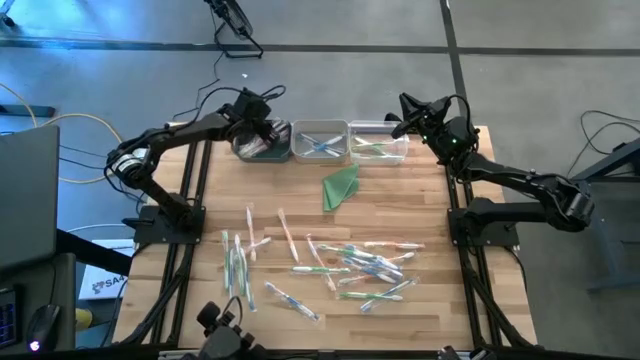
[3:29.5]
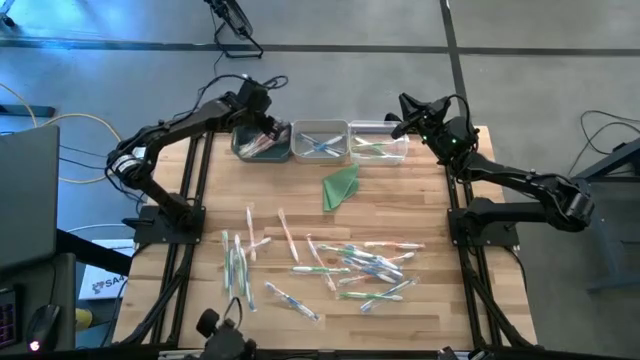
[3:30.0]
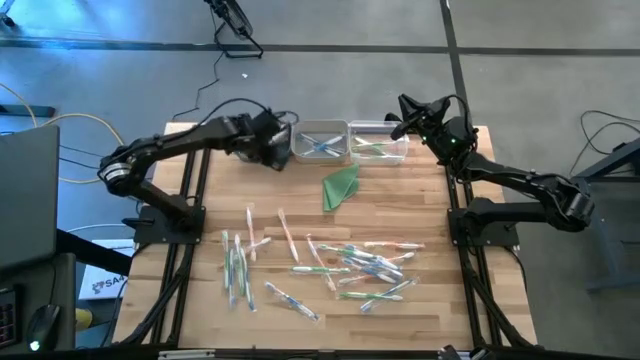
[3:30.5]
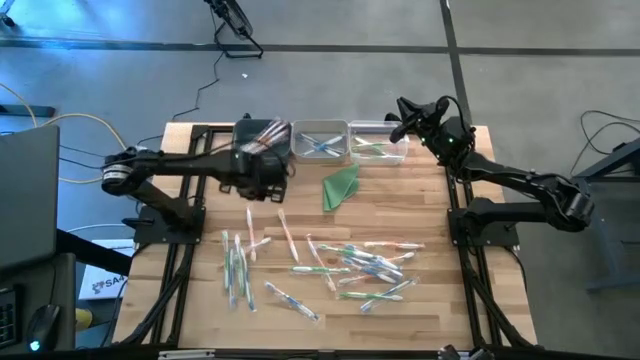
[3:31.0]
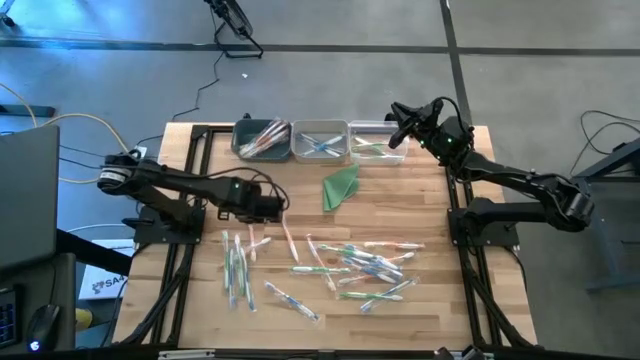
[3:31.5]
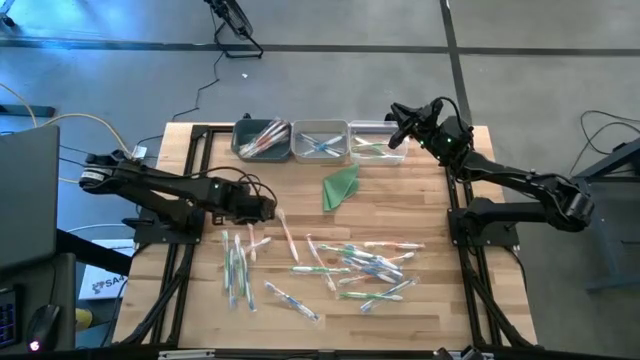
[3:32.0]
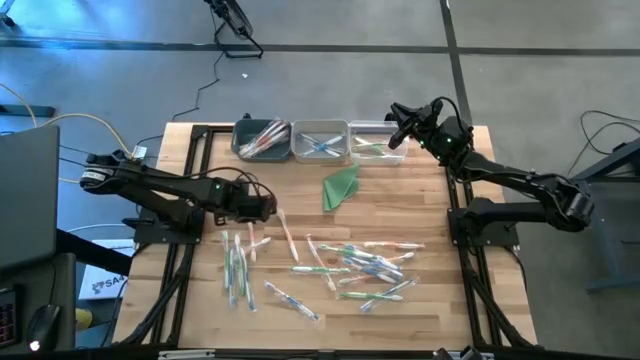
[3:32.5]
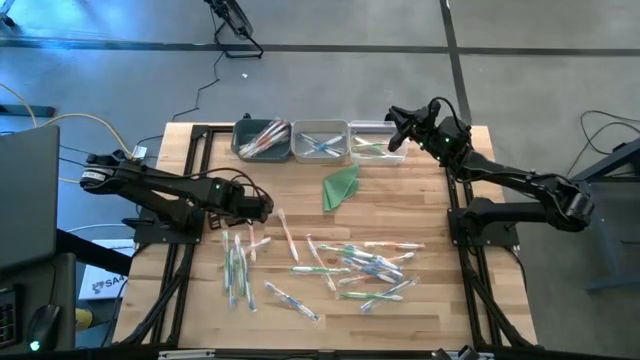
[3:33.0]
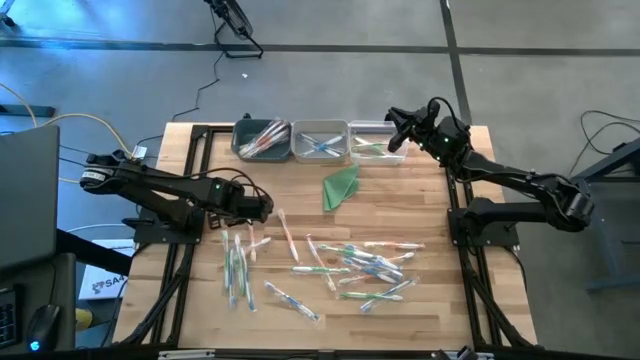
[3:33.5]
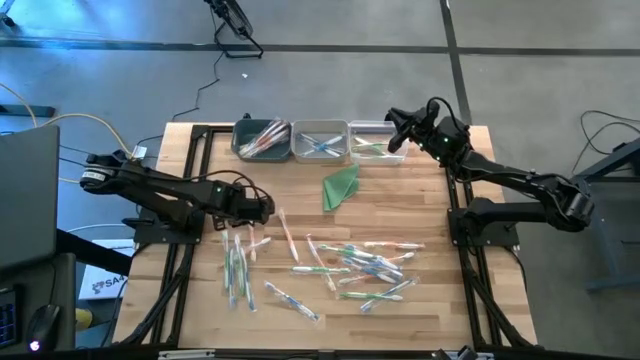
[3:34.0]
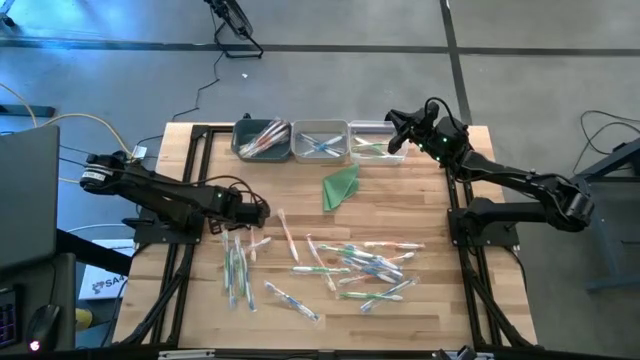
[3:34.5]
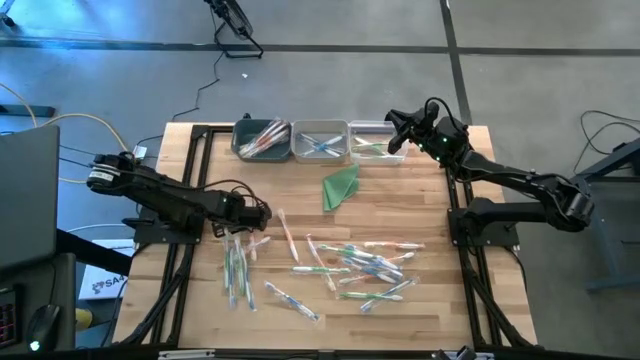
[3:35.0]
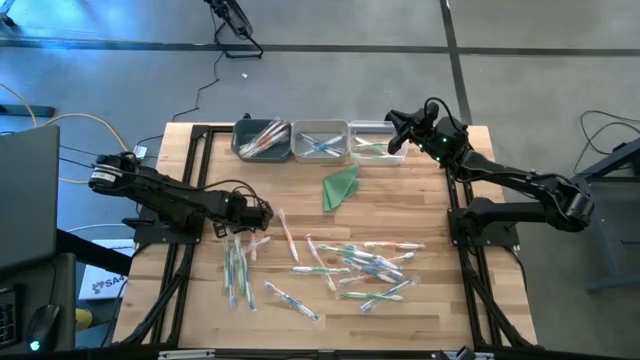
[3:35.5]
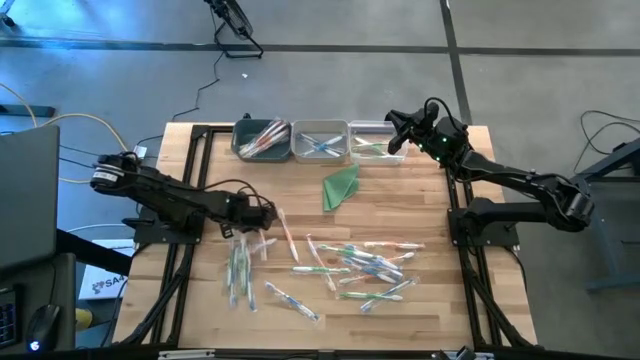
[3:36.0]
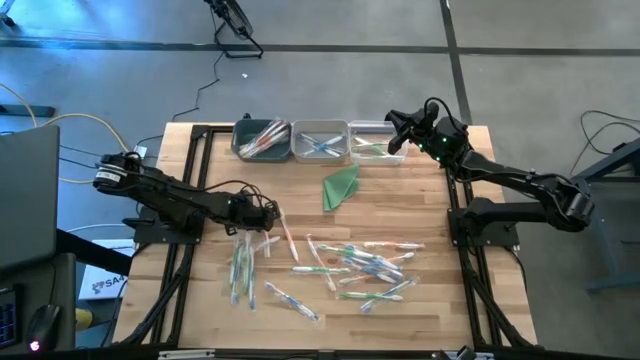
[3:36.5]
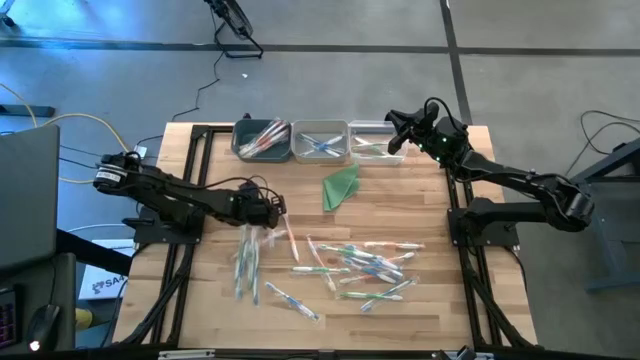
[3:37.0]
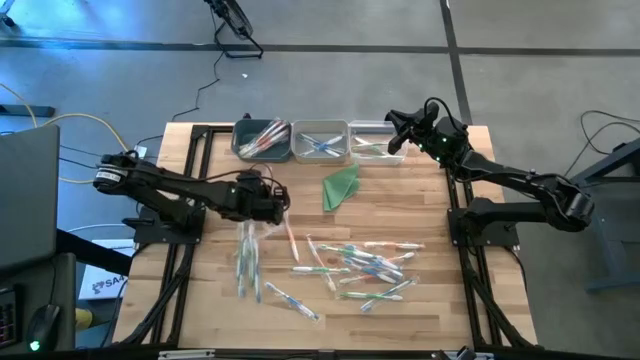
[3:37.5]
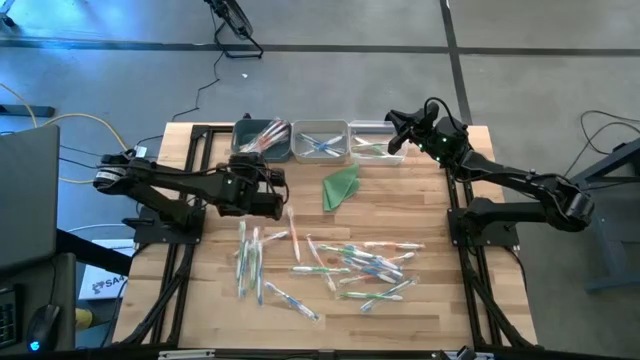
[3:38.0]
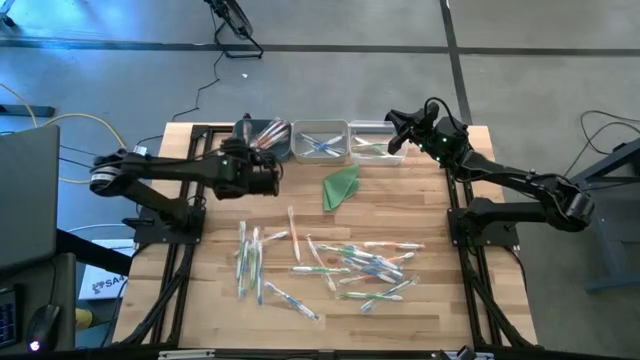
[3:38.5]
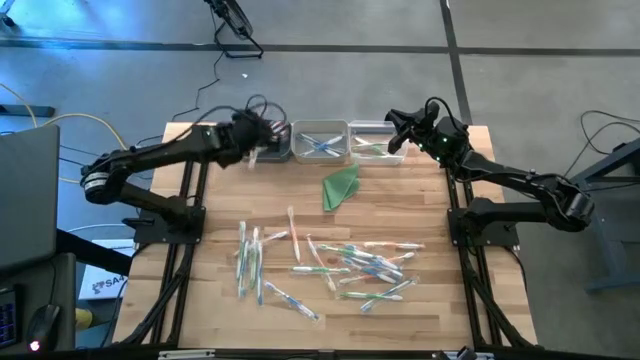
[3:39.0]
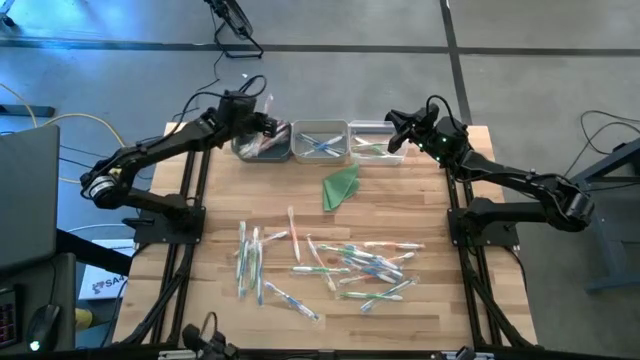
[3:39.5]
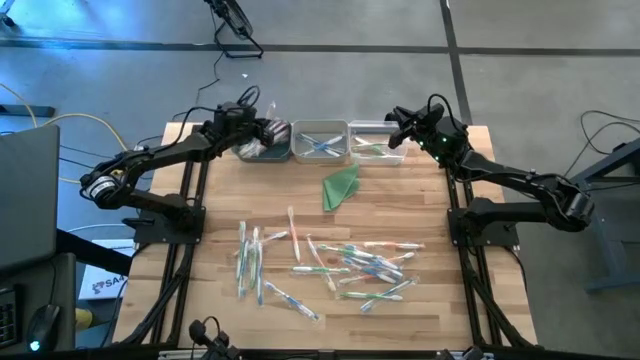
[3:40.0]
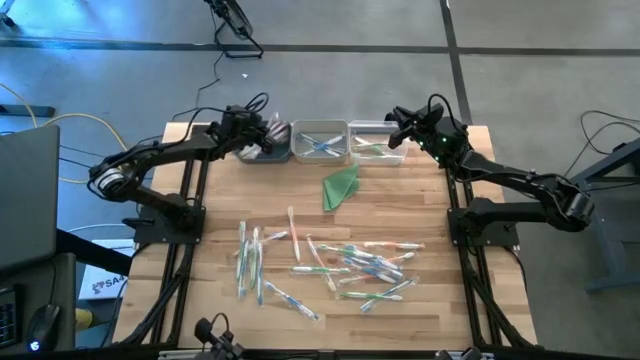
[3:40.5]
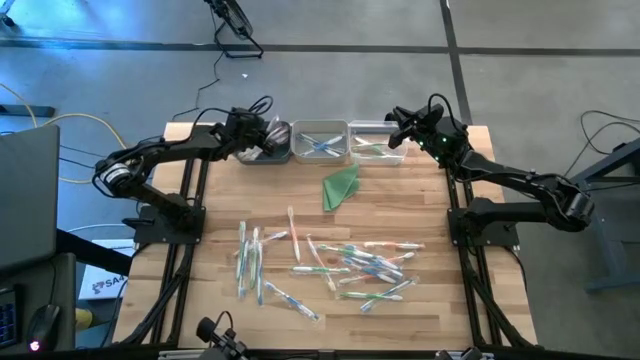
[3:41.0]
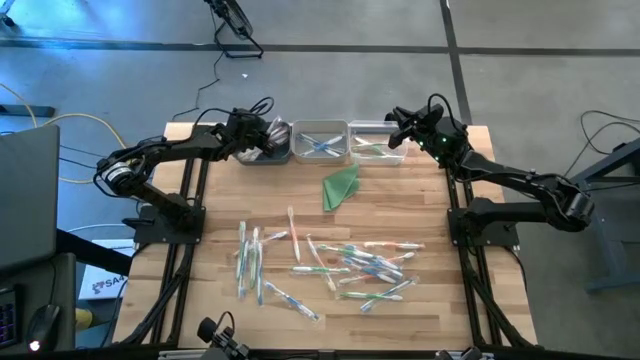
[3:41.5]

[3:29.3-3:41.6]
Task: Pick & Place Toothbrushes
Put the orange toothbrush into the dark blue bin

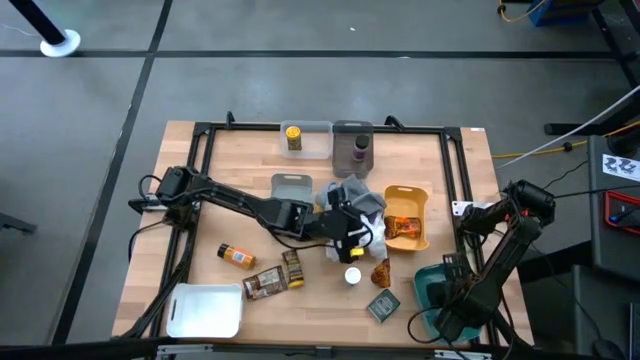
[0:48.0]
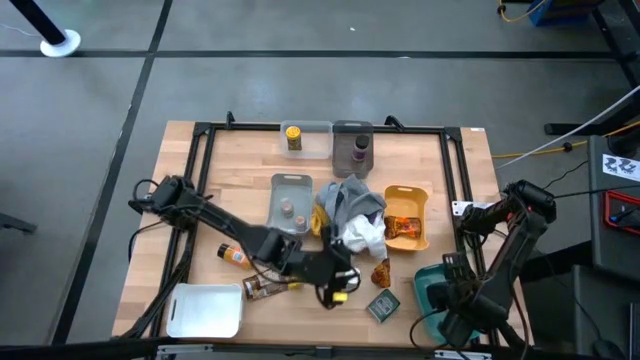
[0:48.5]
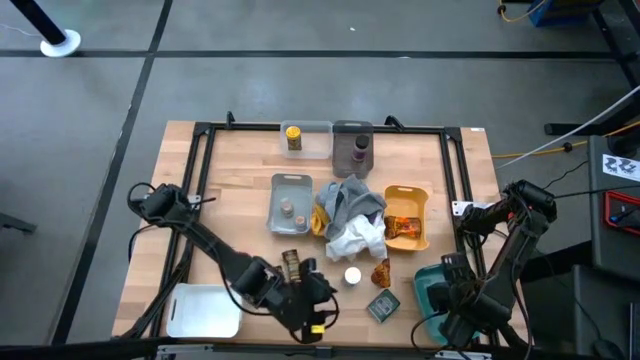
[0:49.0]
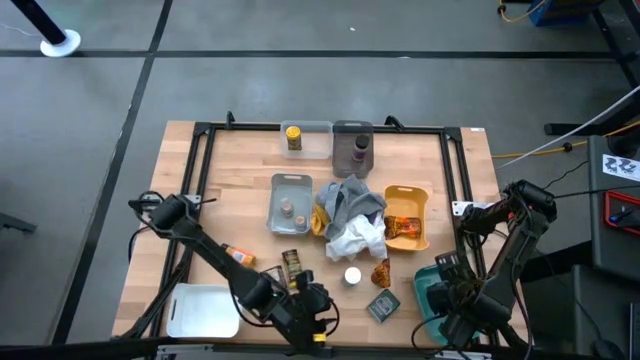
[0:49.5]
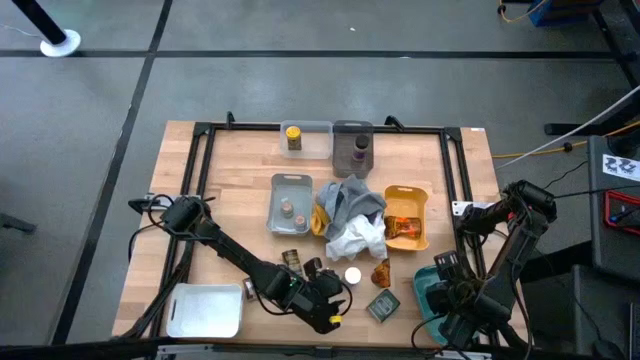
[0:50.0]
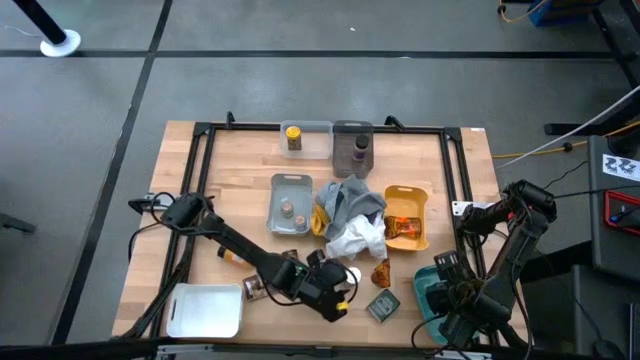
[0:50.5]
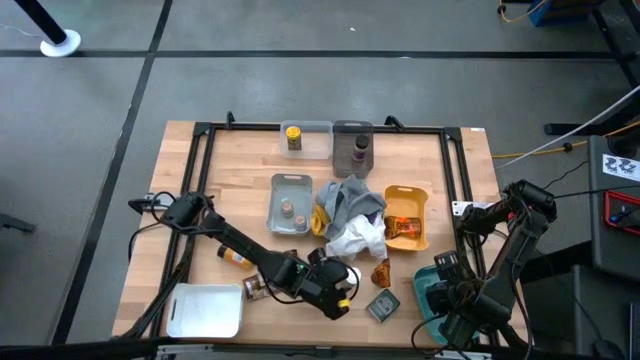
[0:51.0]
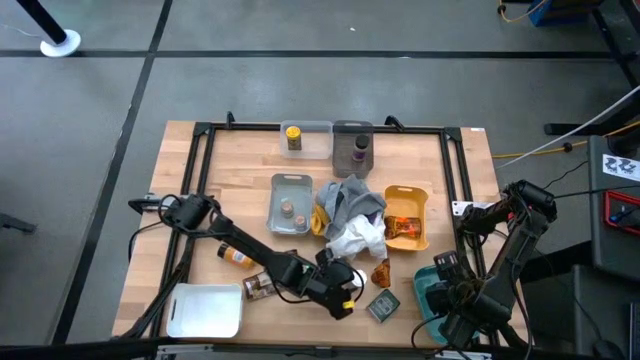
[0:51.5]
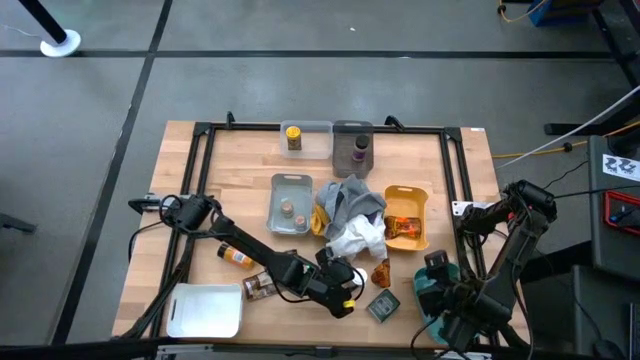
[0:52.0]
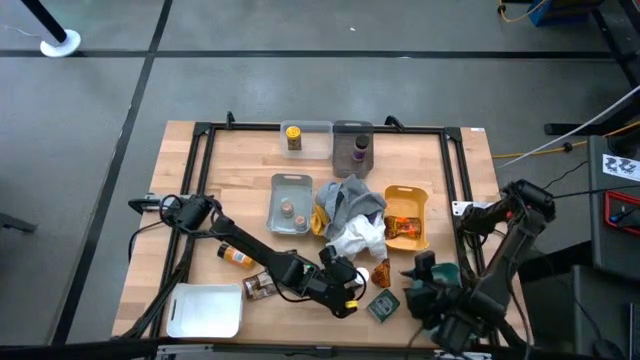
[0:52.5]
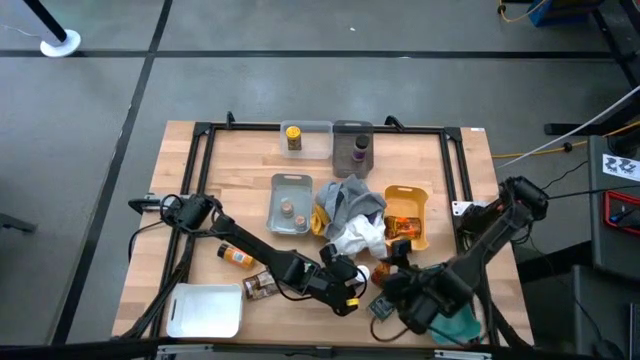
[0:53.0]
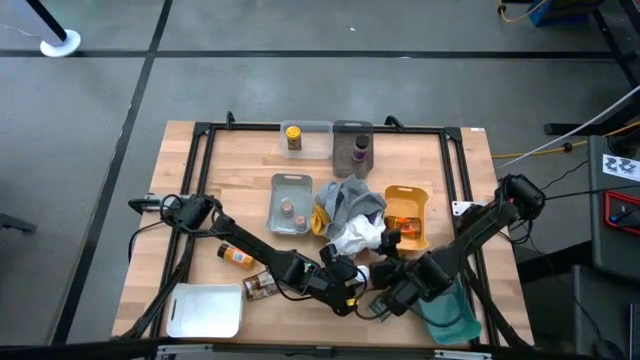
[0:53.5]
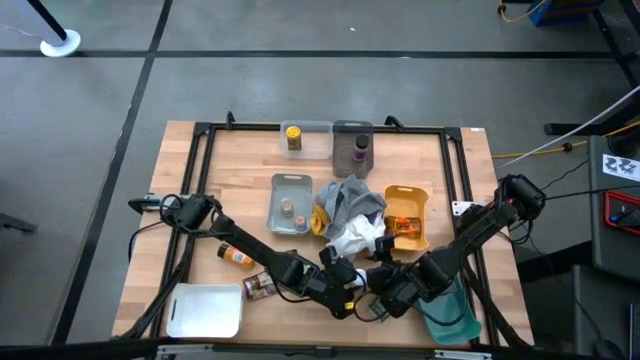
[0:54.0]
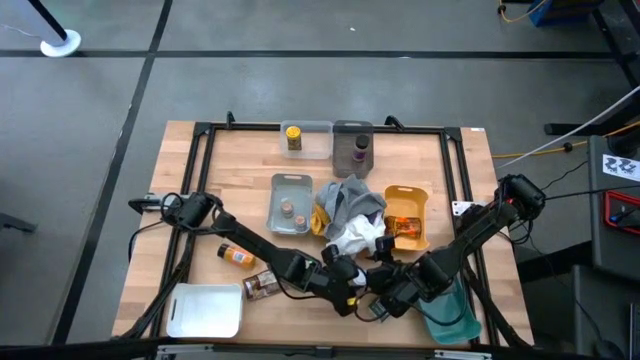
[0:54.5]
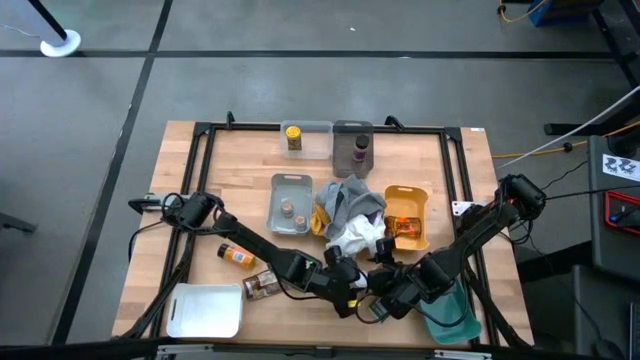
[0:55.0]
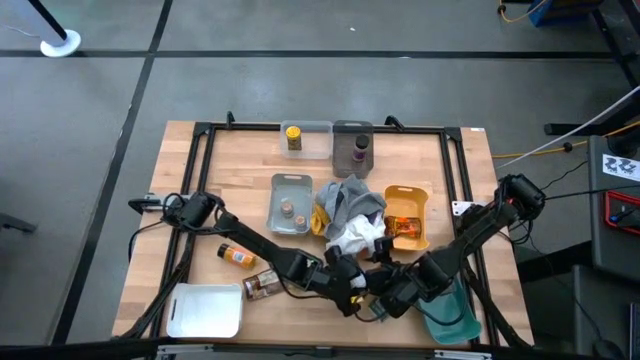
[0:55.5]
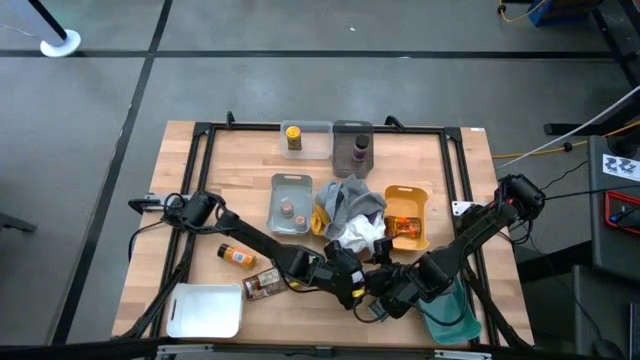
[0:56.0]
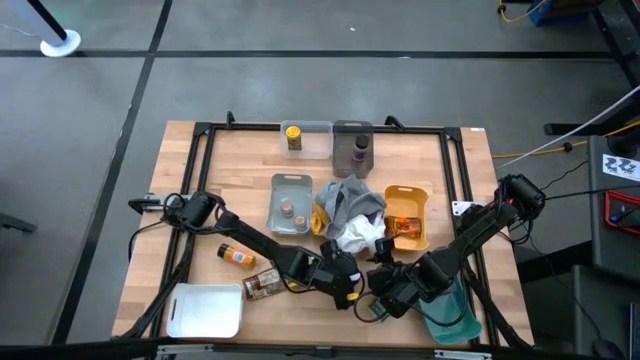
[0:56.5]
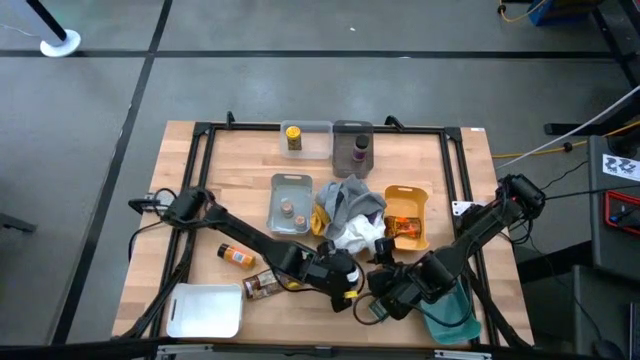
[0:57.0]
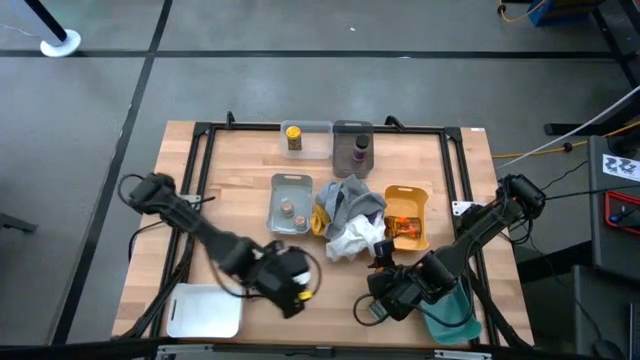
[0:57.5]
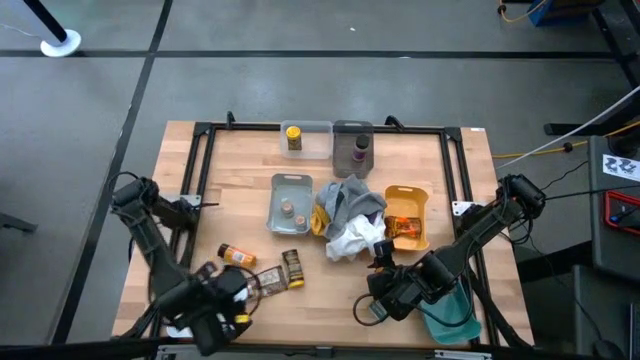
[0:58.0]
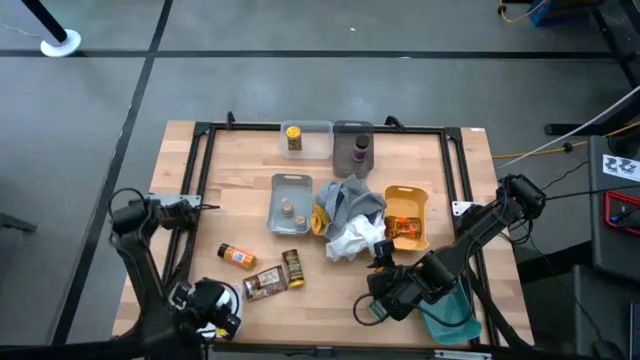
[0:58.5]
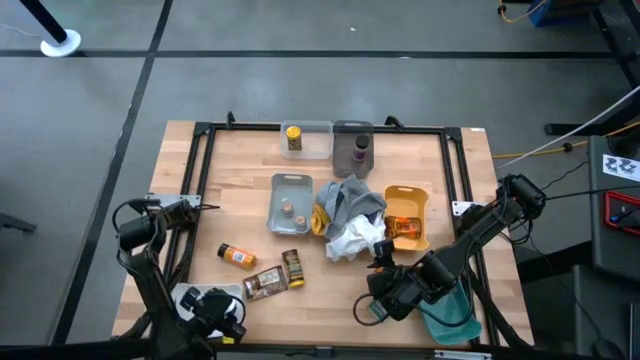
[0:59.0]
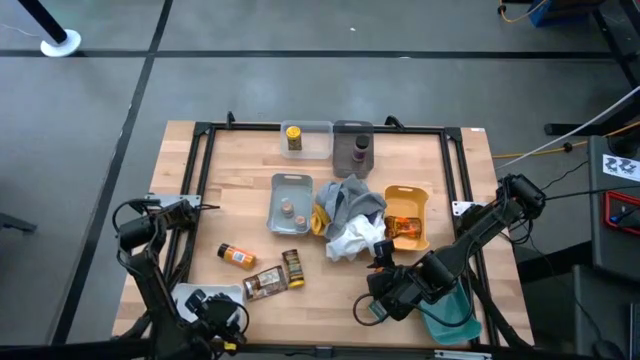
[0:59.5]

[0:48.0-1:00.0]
Task: Sort spices by type
Put the white seasoning bottle into the white bin
